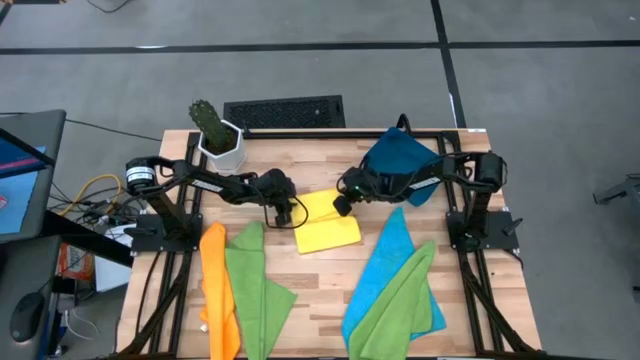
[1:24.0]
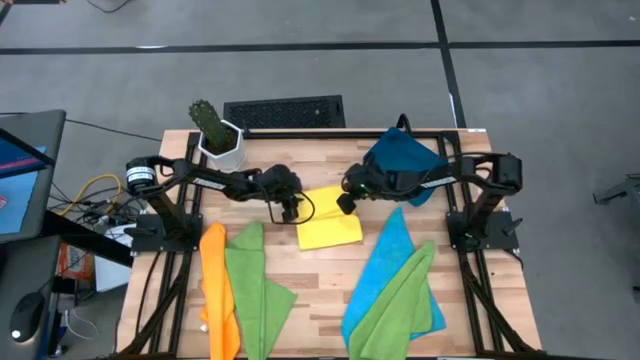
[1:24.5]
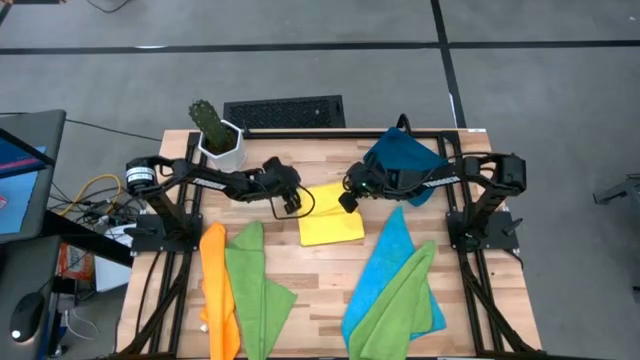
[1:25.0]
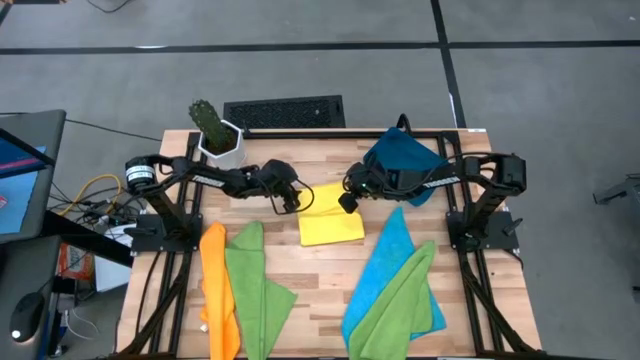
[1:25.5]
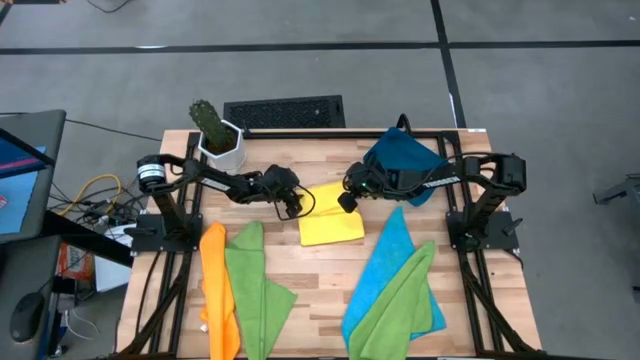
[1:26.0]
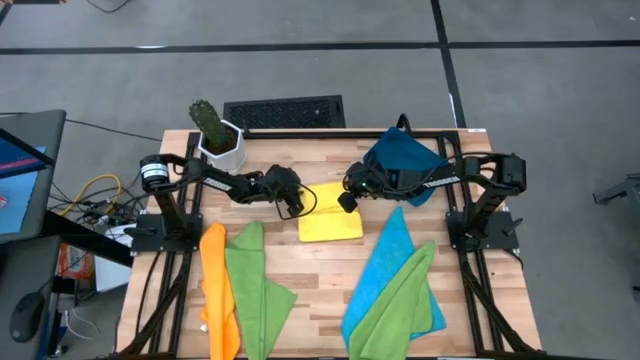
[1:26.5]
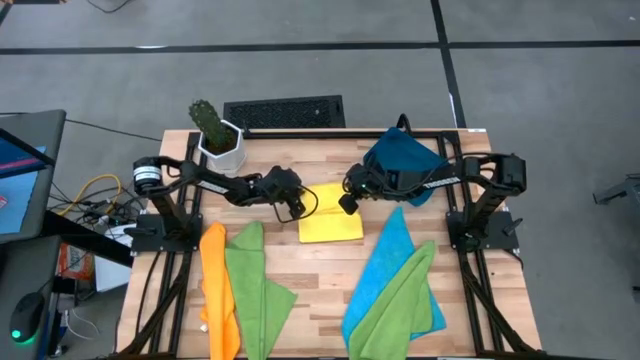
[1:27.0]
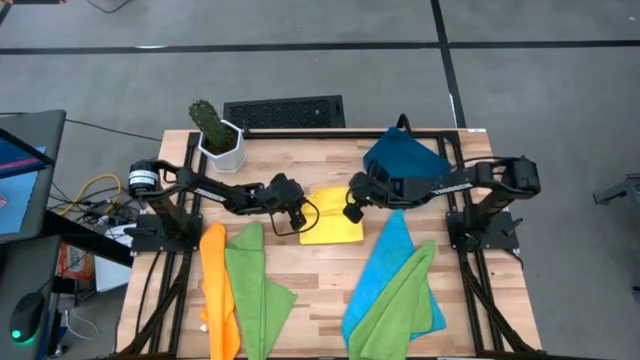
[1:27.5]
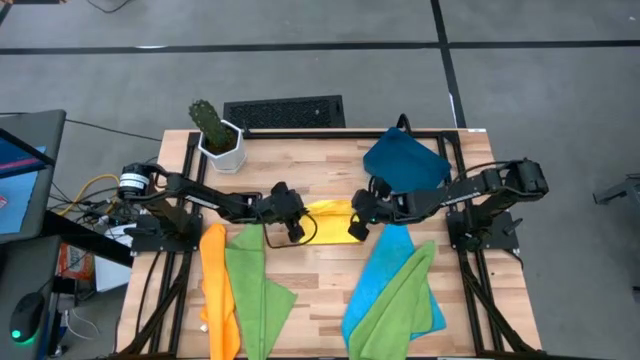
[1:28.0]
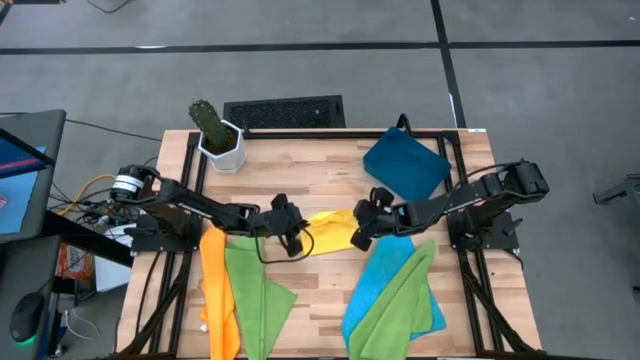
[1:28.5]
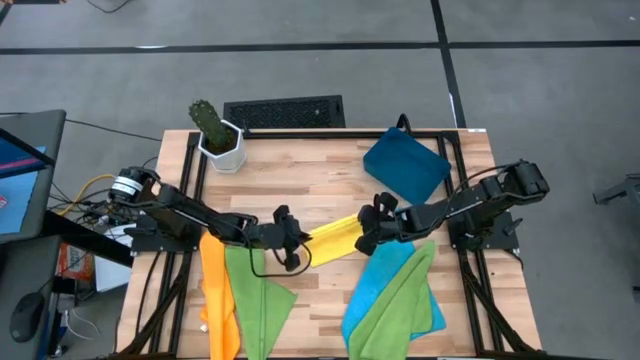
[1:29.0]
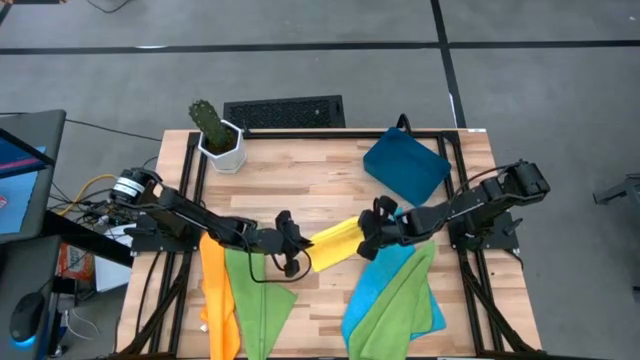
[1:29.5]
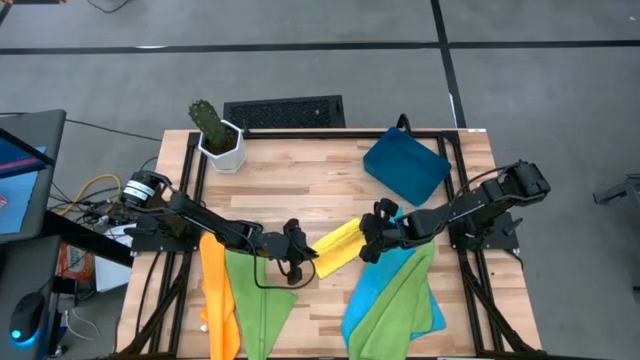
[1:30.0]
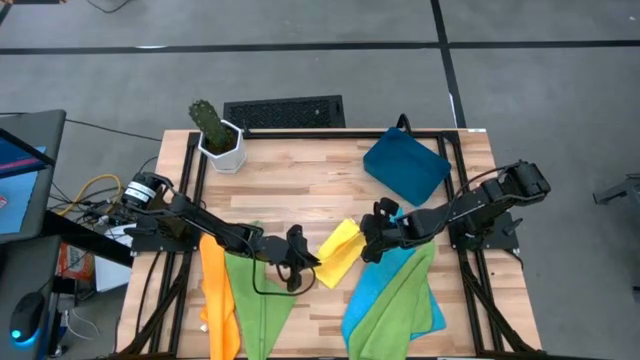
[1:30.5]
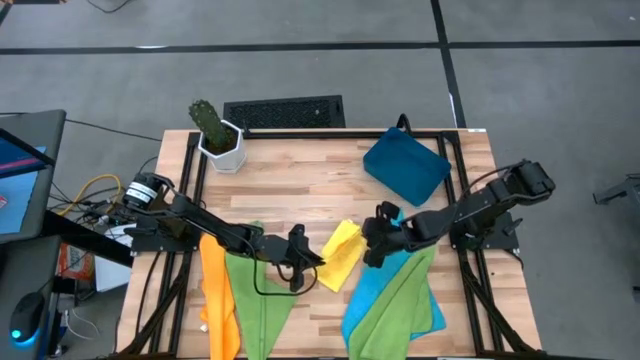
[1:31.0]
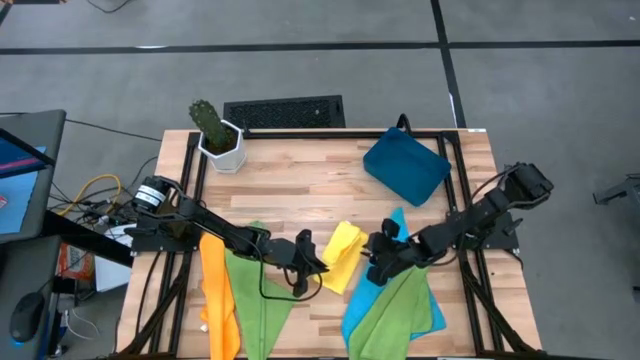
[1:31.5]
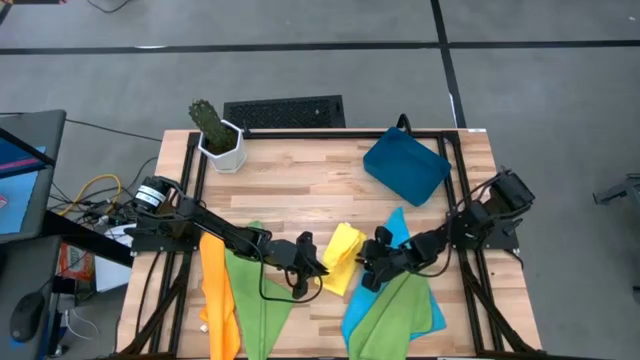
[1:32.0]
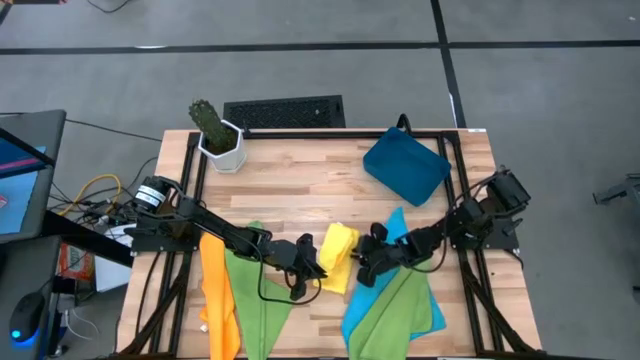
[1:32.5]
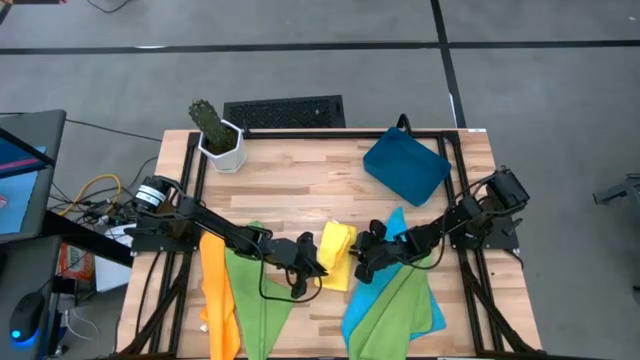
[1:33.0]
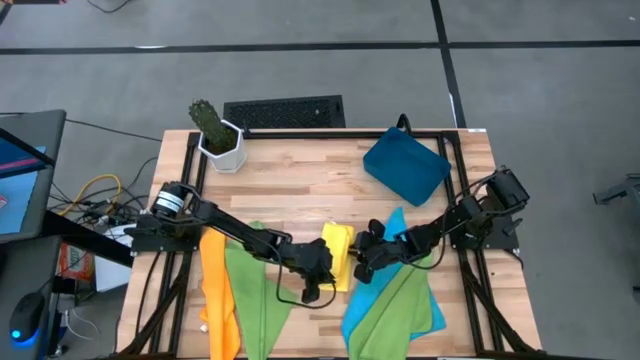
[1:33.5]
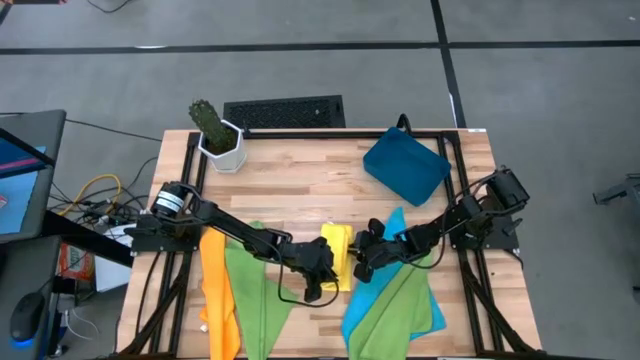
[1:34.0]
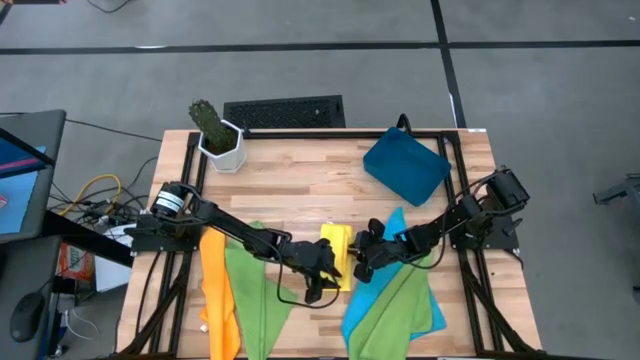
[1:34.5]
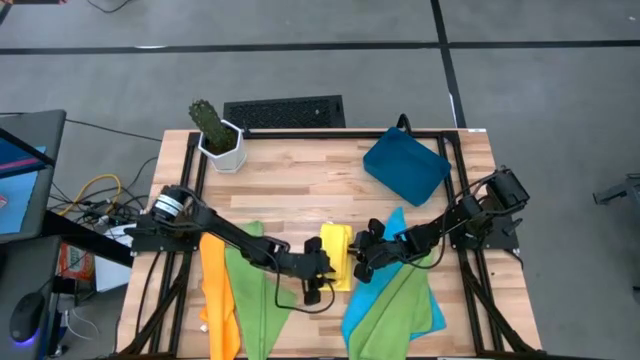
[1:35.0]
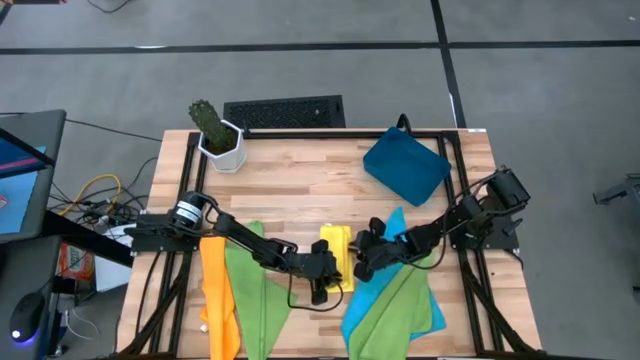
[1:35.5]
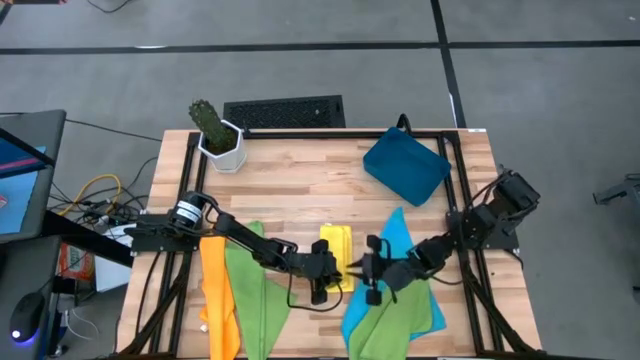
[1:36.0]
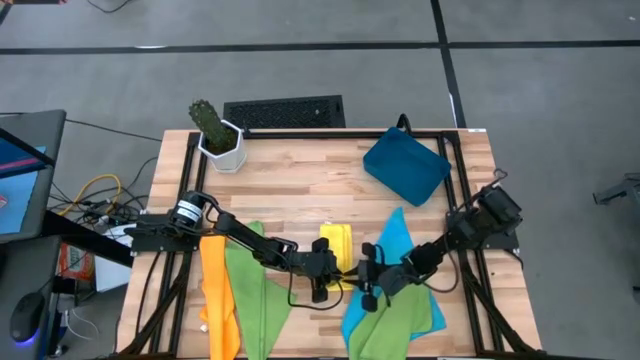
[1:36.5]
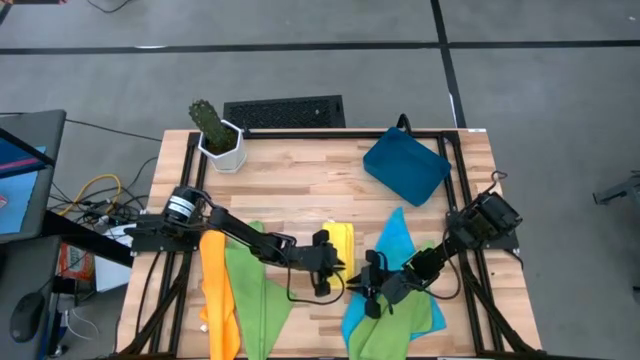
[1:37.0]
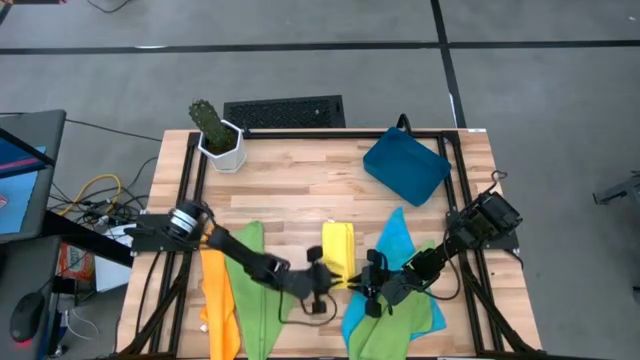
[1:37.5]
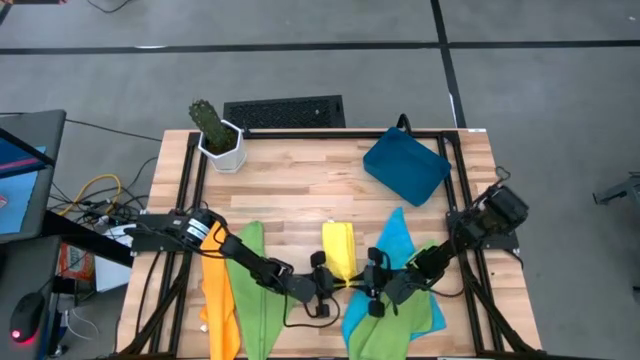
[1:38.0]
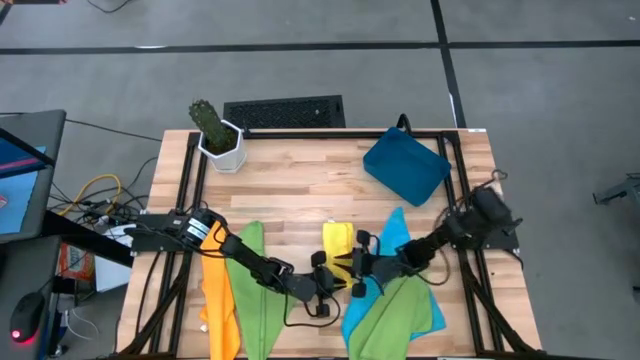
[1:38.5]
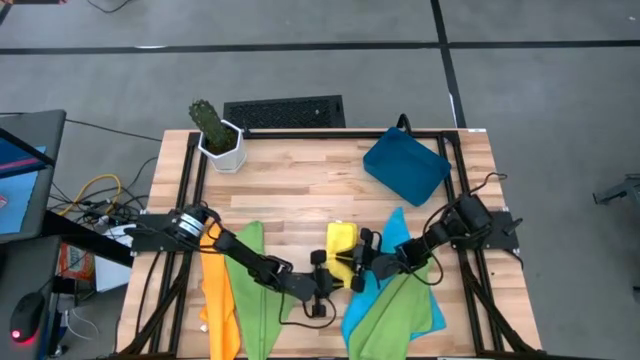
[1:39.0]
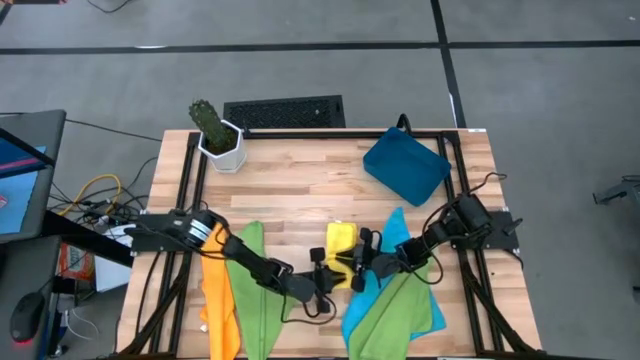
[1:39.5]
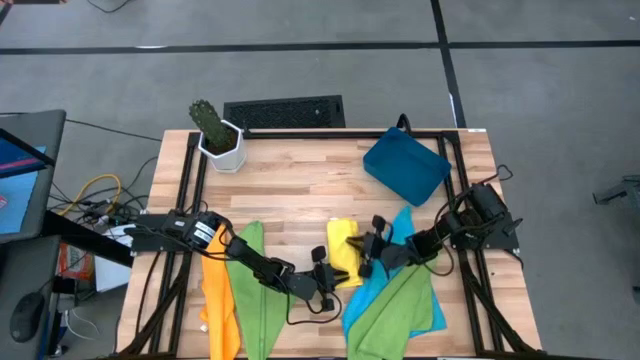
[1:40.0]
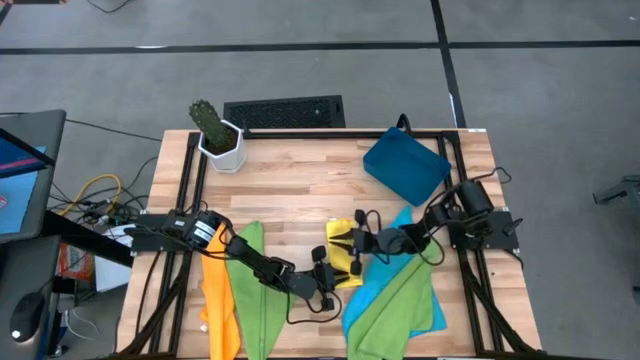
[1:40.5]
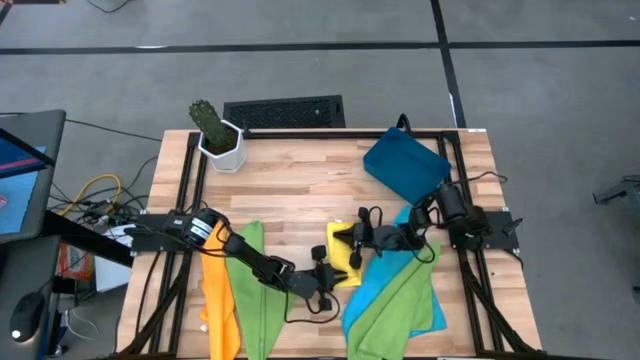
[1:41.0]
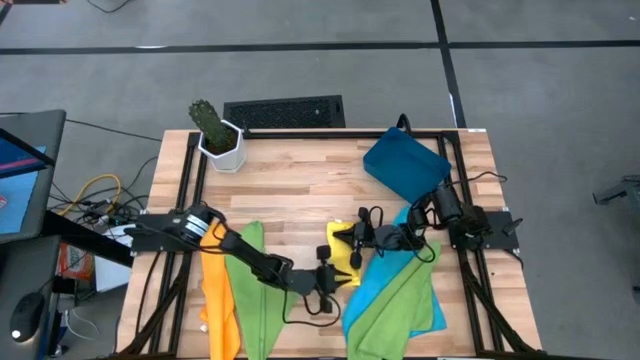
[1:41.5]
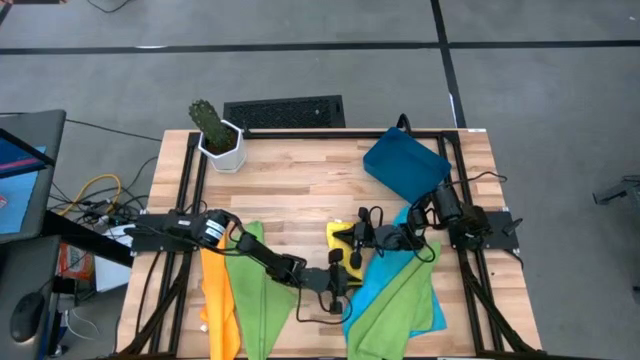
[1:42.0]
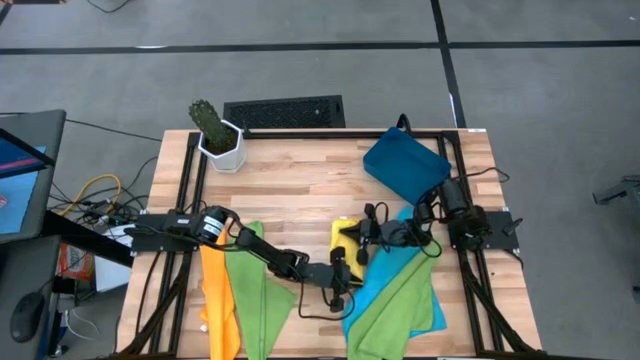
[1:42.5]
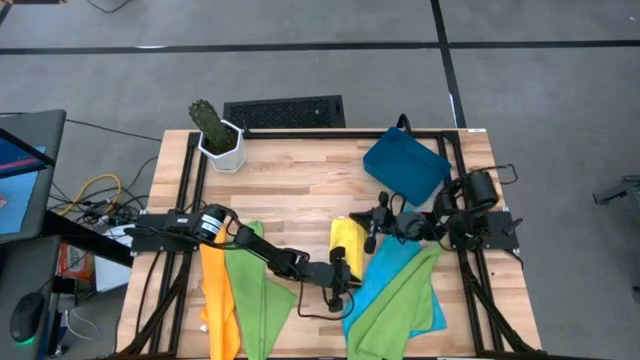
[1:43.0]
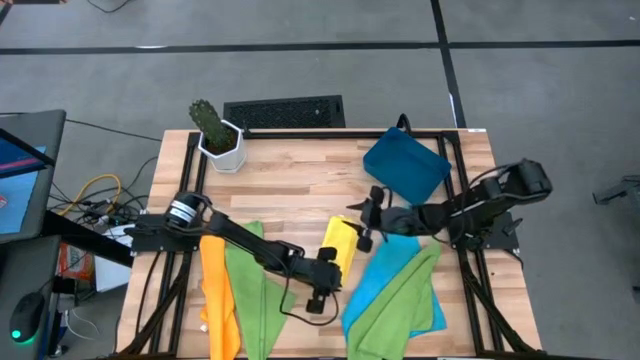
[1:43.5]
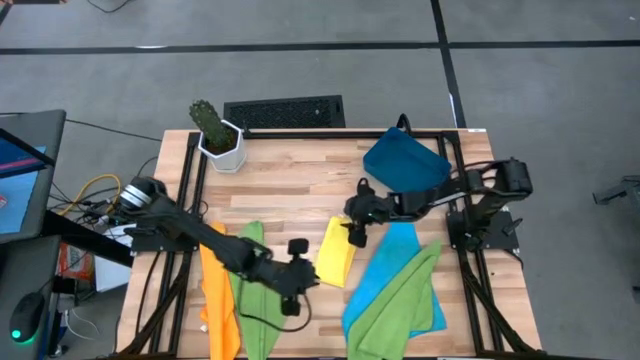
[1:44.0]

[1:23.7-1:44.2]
Task: Fold microfiber towels
Fold the yellow microfiber cloth

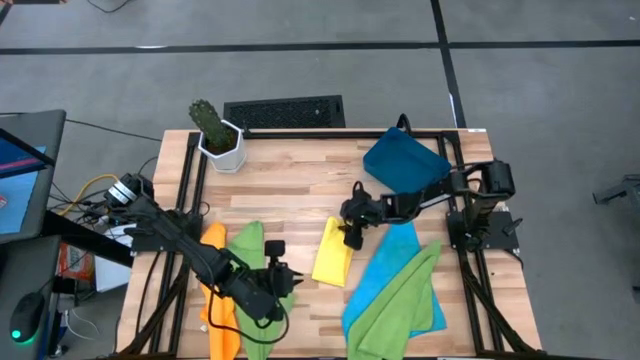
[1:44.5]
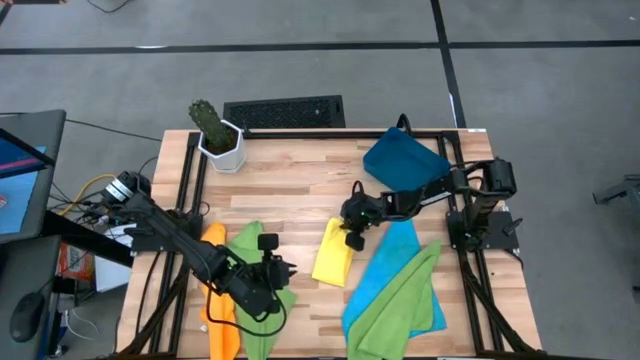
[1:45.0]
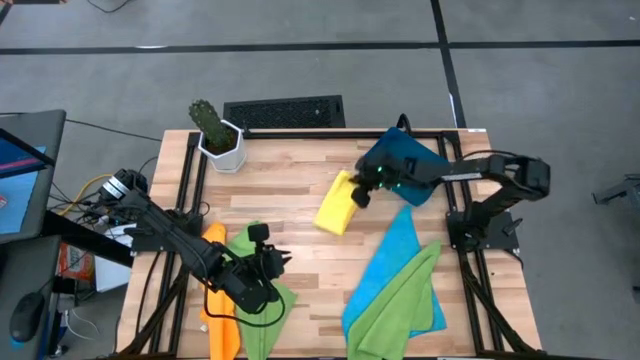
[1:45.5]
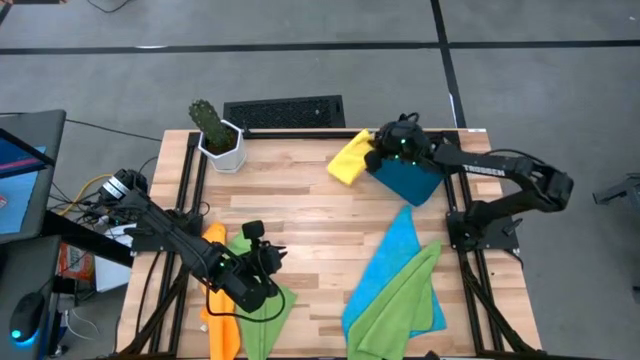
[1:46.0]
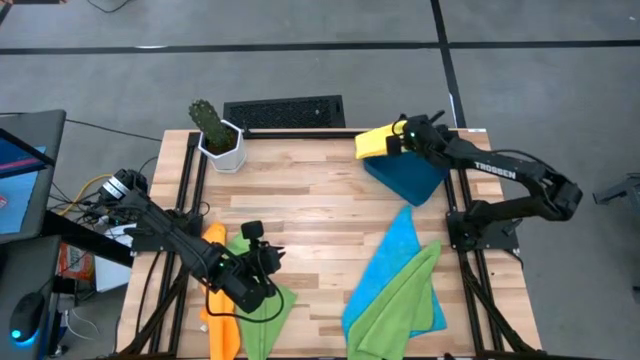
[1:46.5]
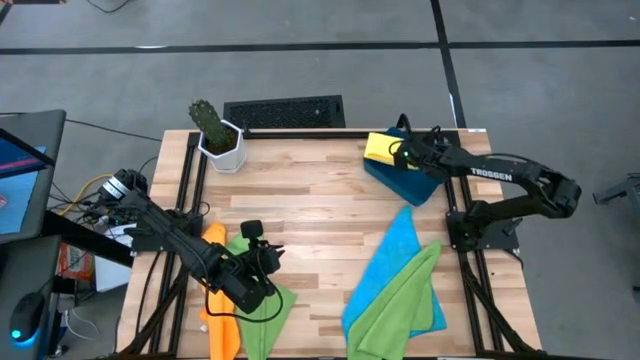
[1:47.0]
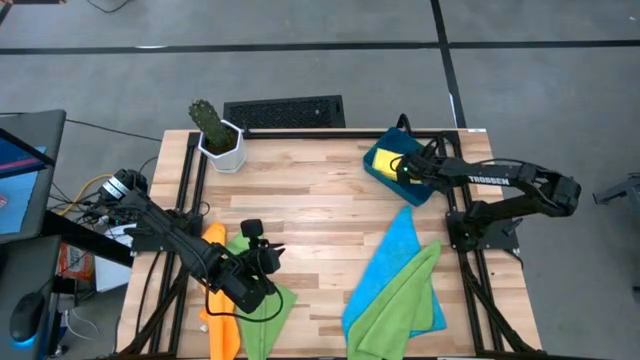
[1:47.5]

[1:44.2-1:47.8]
Put the yellow microfiber cloth into the blue bin
